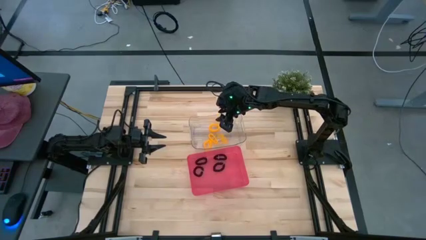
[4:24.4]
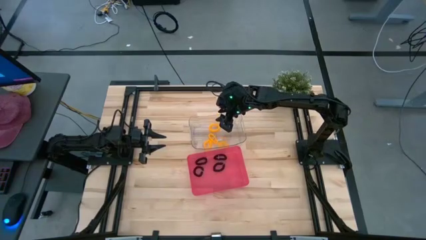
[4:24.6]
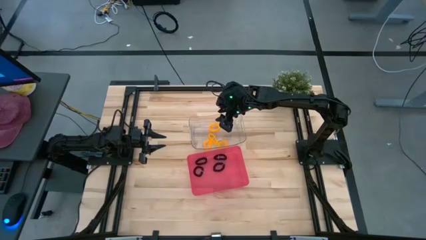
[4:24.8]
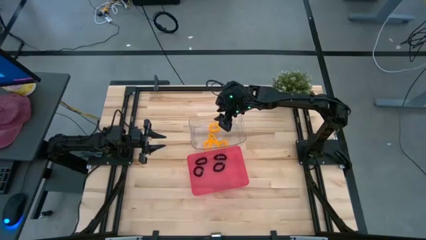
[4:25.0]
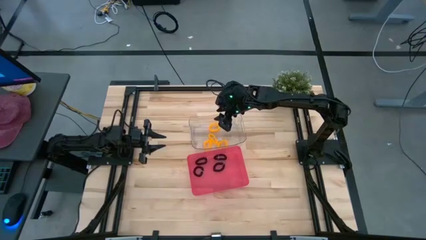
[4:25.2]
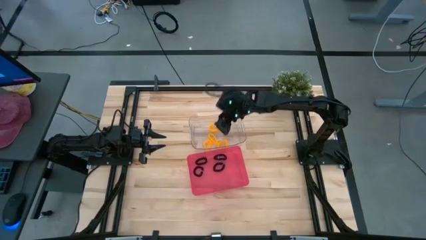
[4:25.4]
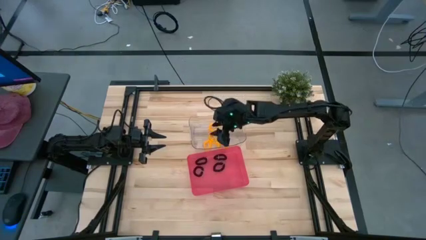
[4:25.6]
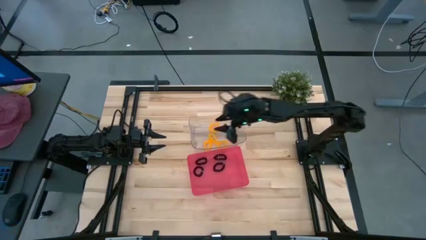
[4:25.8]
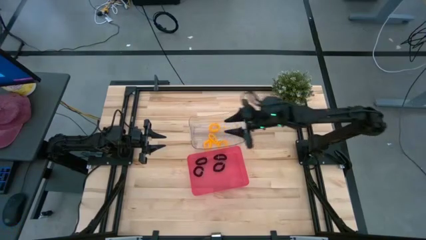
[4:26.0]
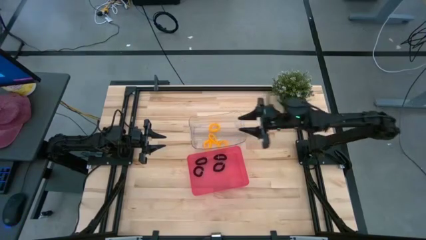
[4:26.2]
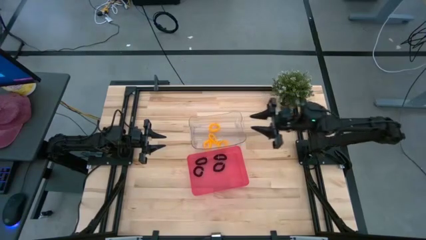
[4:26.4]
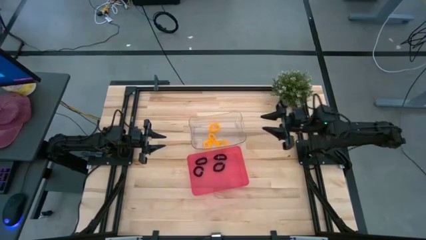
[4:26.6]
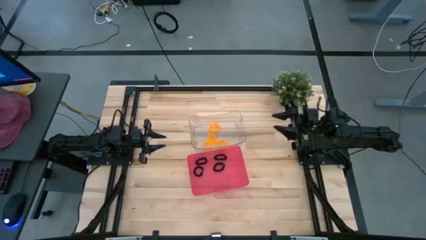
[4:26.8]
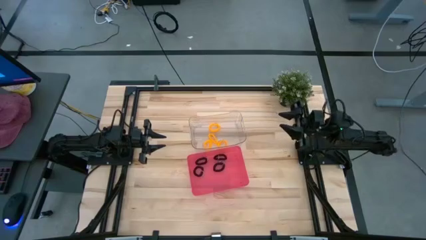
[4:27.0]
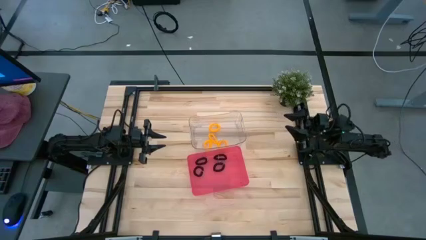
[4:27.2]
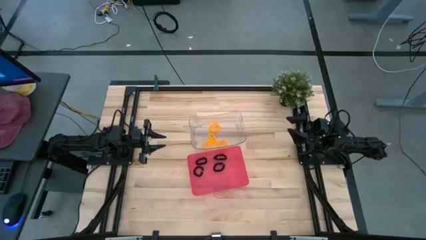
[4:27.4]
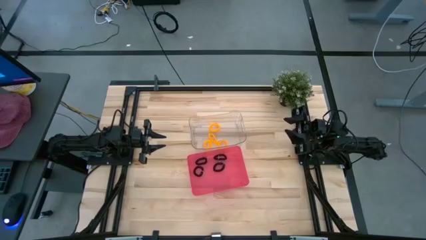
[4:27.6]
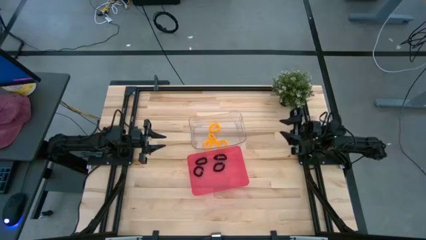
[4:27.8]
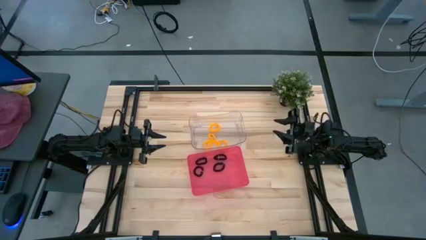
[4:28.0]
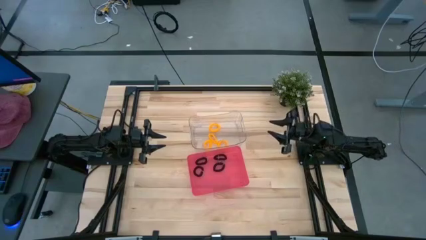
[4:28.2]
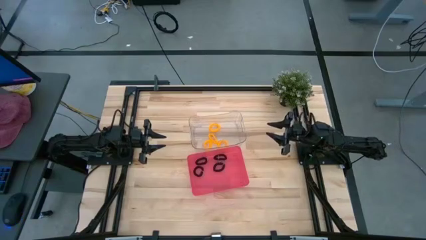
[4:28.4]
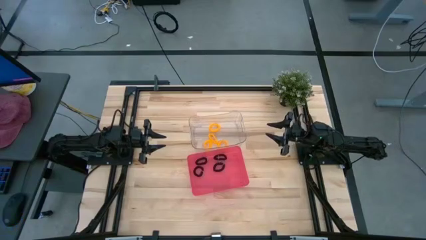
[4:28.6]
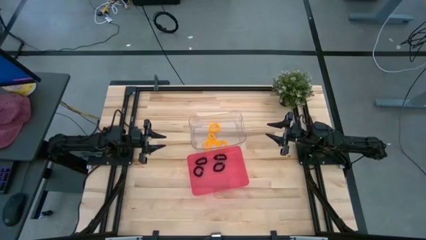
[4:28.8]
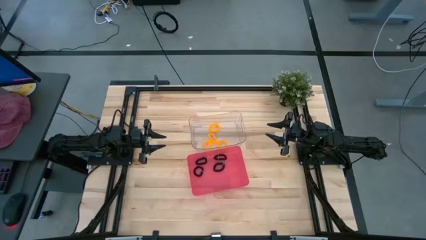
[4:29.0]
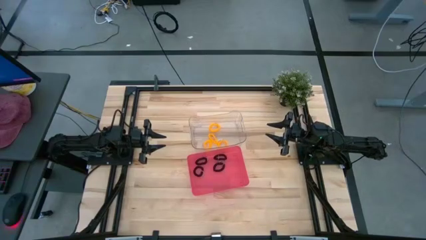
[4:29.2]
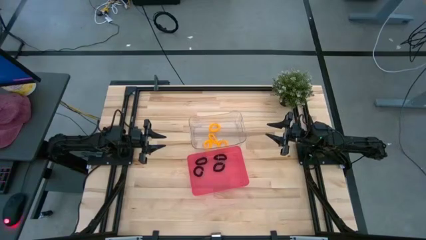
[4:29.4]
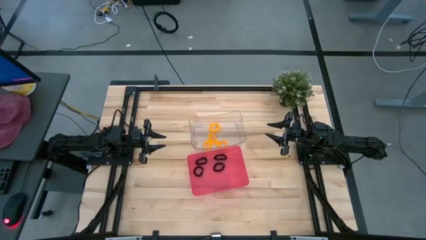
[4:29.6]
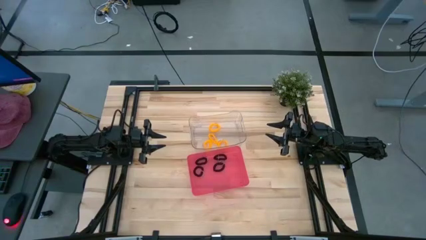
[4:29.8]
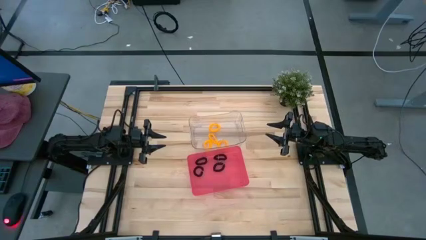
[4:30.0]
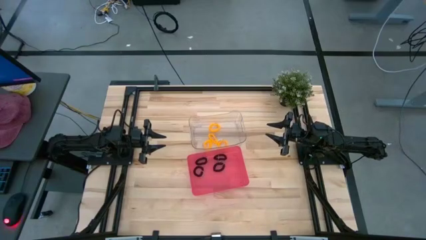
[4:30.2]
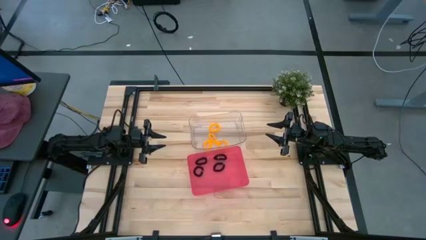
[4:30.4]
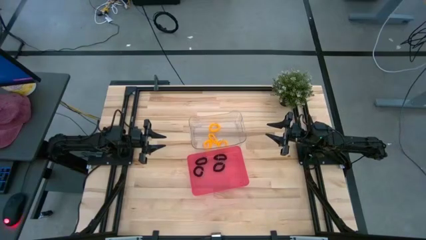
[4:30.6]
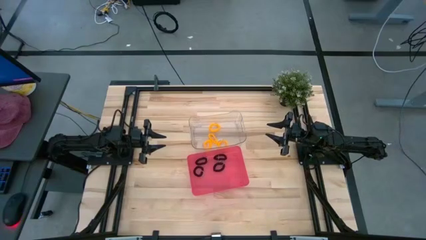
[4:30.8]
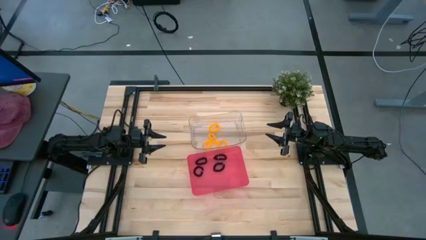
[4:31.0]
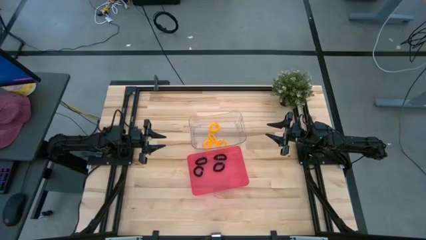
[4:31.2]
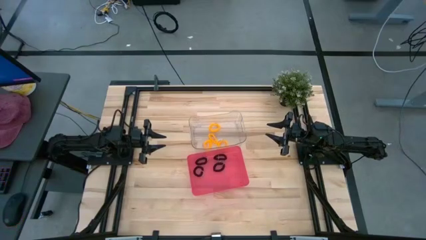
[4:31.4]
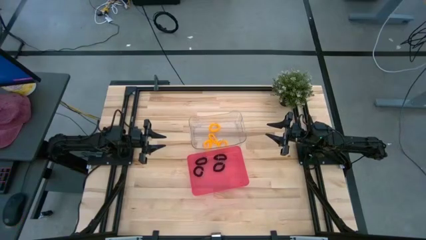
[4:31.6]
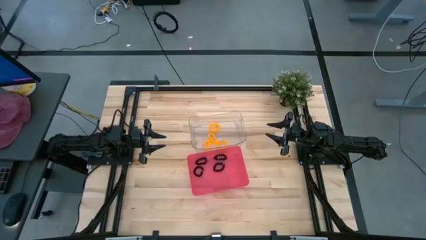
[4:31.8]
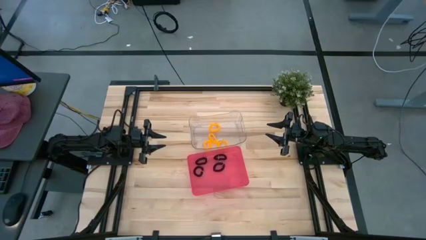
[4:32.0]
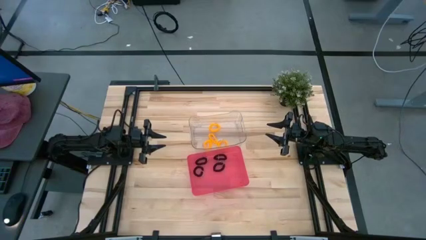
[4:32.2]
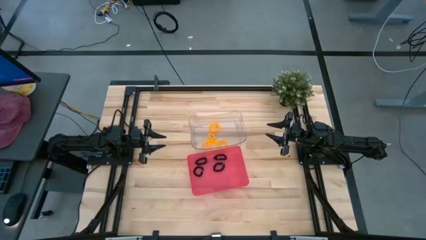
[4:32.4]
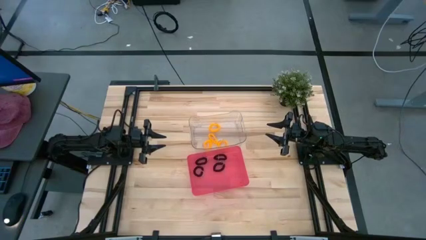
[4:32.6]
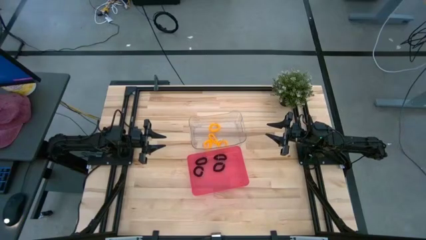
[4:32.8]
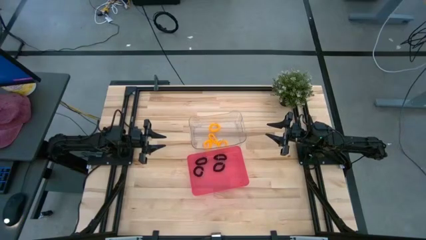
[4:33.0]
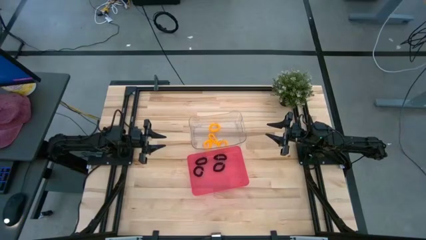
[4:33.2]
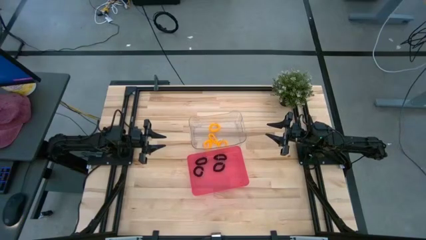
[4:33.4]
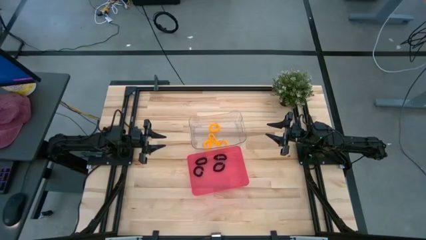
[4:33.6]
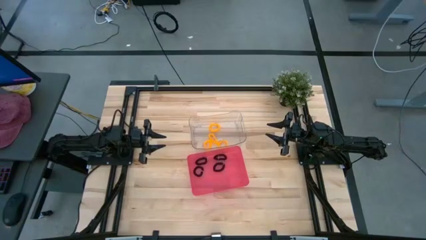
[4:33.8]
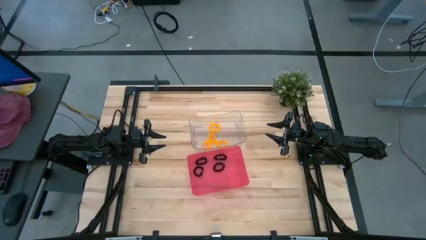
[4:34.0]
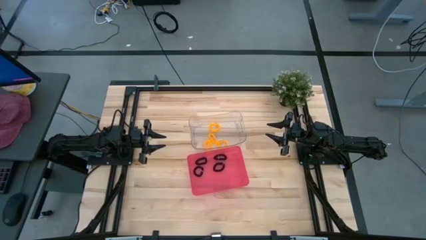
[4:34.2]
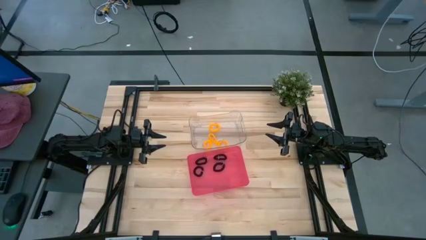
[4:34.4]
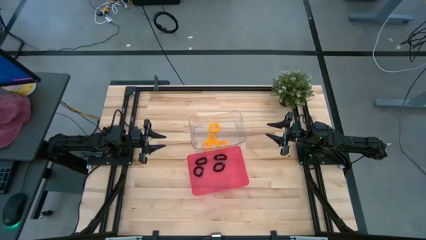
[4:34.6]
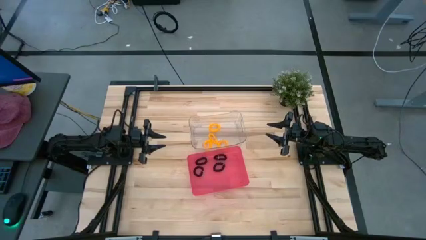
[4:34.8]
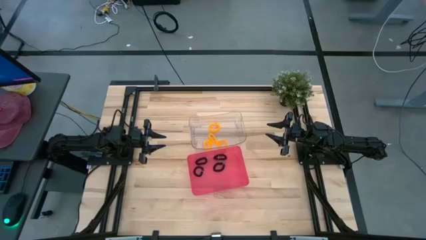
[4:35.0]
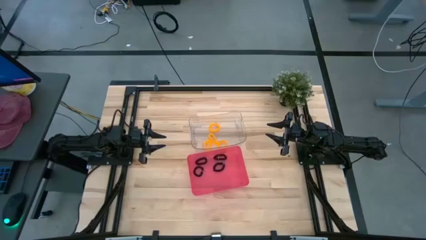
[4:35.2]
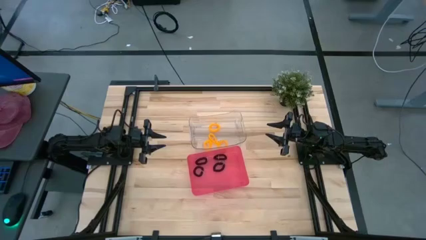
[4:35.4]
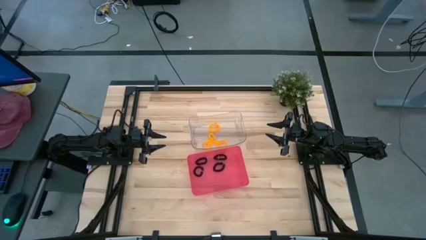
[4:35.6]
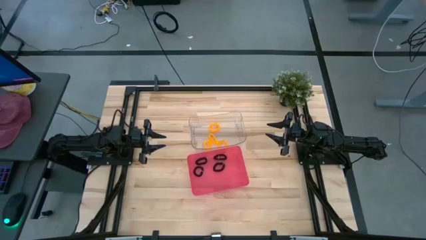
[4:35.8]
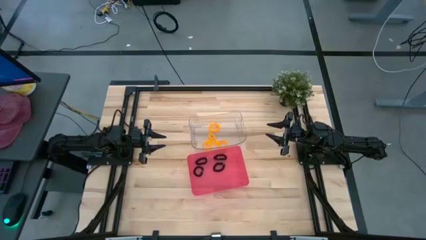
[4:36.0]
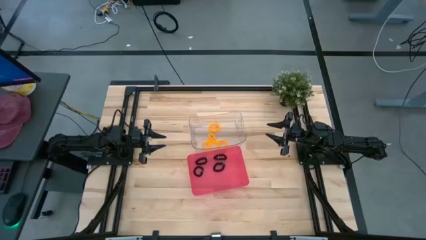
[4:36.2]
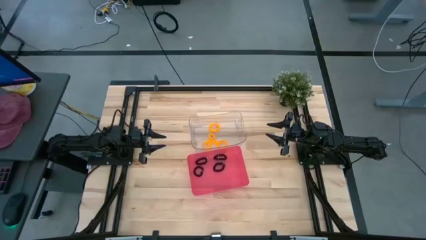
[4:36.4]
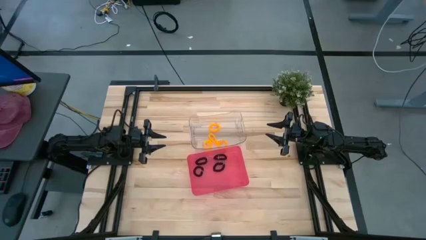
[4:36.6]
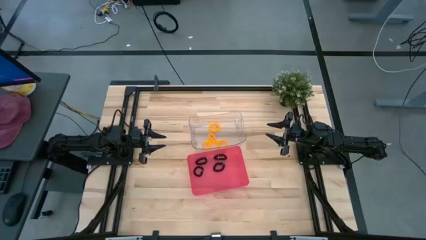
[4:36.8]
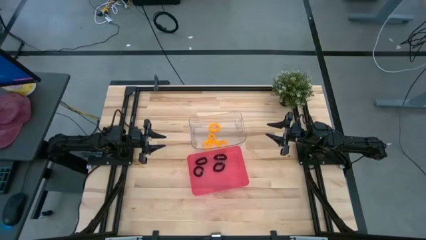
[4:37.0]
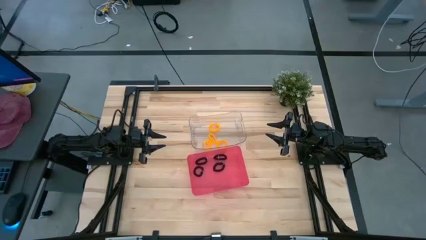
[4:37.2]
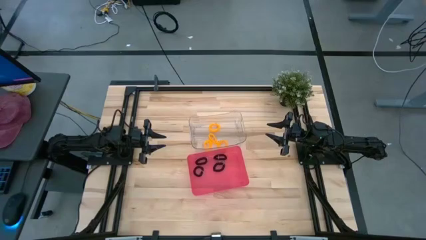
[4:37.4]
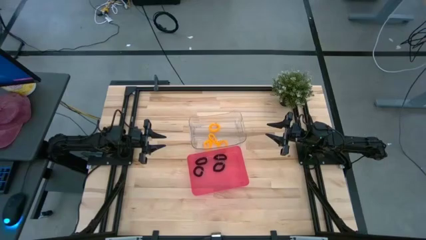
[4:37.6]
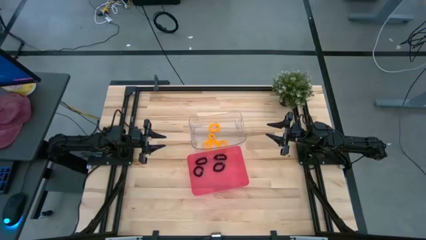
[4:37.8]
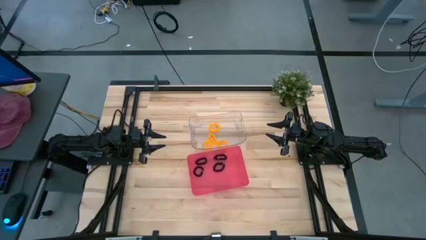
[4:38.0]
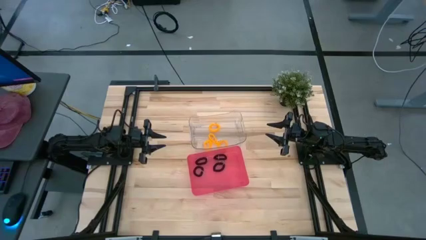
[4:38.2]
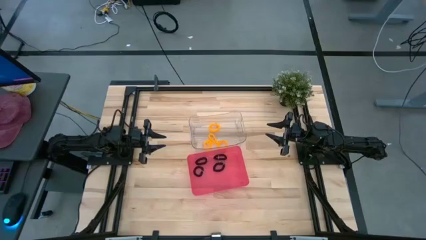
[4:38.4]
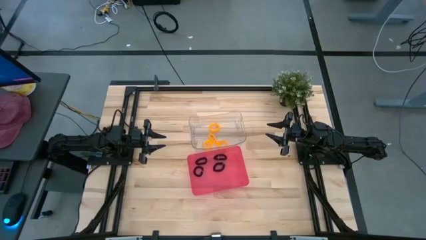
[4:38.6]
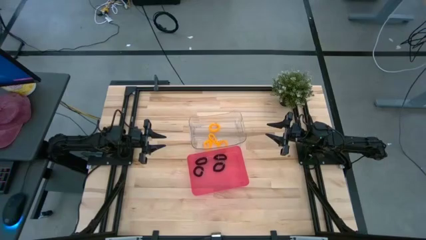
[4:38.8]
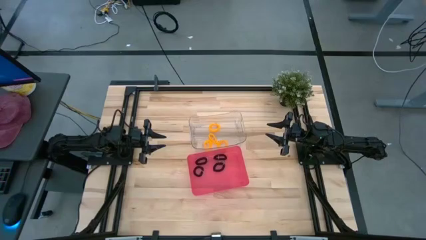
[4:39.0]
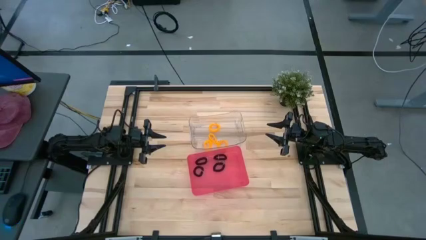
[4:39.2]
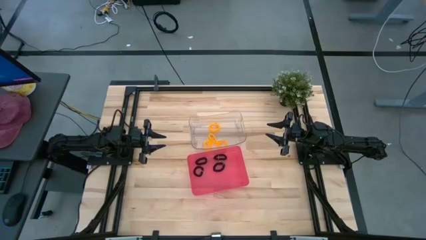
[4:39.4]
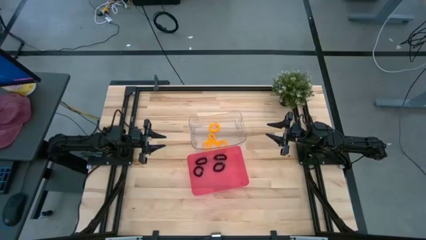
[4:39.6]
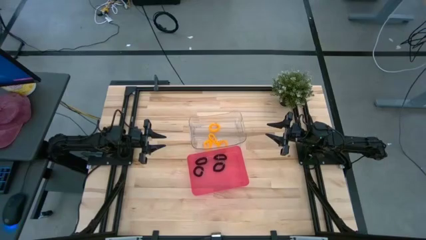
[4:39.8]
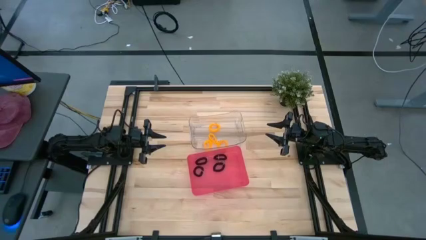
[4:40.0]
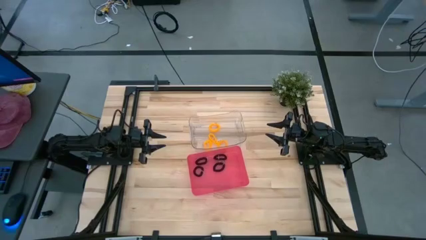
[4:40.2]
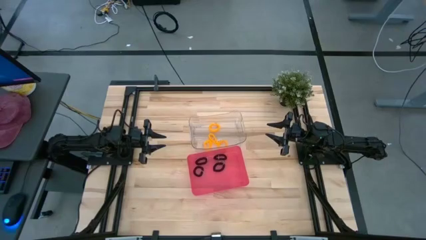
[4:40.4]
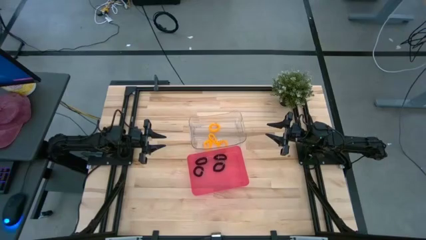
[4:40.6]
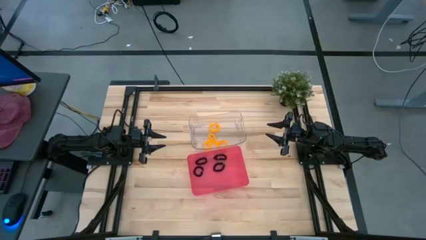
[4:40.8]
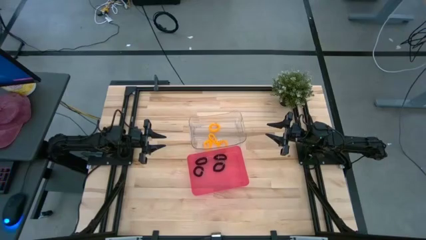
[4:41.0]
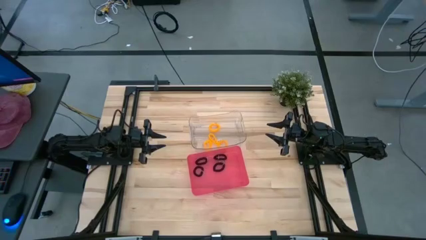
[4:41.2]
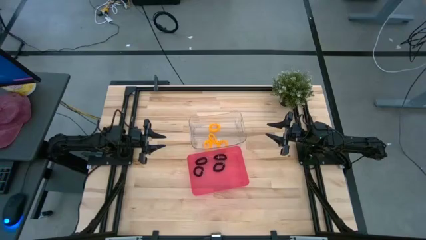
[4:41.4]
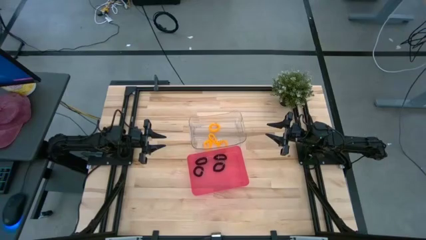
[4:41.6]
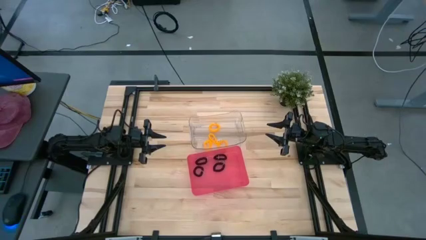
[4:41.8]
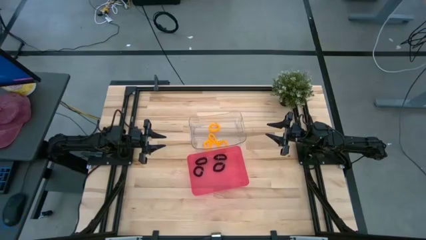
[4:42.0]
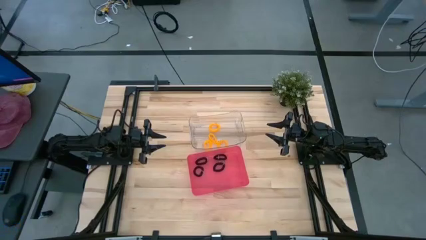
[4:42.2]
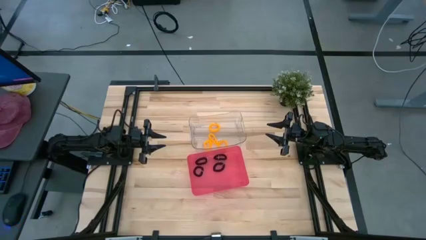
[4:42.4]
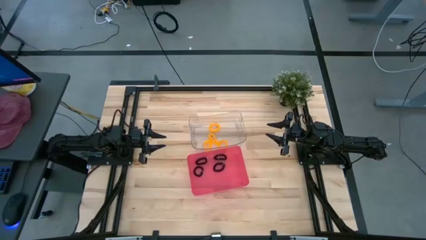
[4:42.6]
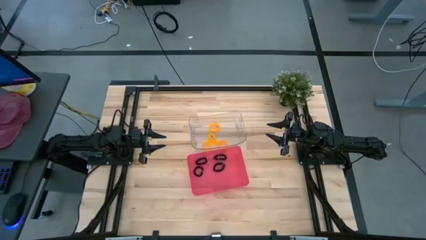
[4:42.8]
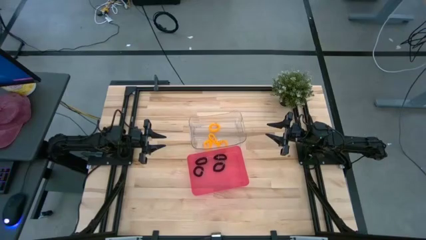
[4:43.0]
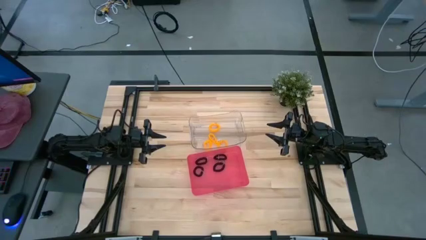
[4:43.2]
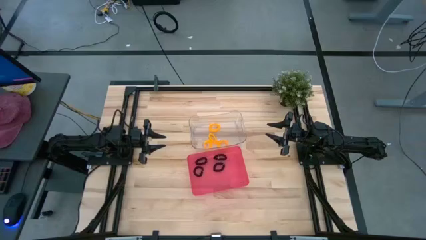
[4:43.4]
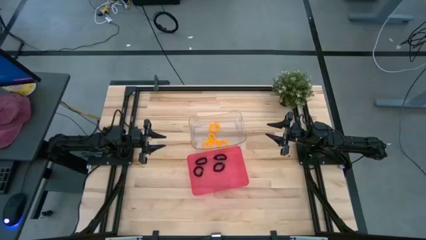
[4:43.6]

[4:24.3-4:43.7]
Task: Sort spring keychains
Return to Home Position
